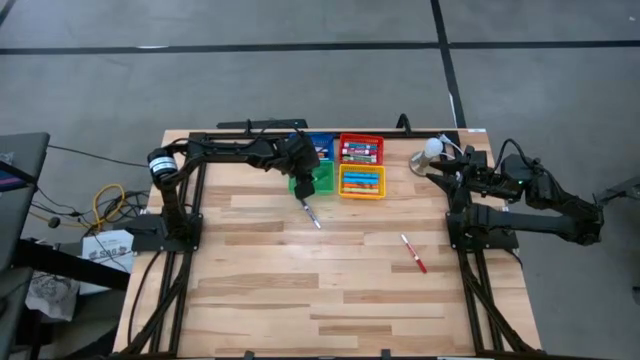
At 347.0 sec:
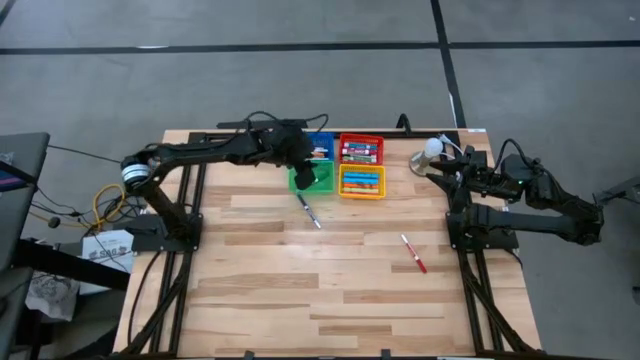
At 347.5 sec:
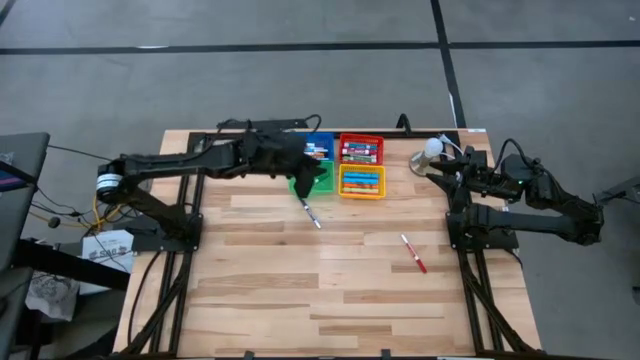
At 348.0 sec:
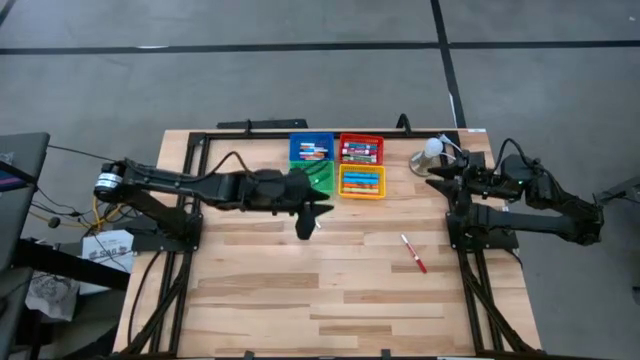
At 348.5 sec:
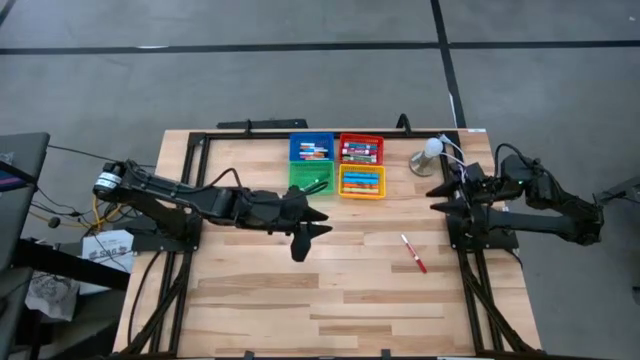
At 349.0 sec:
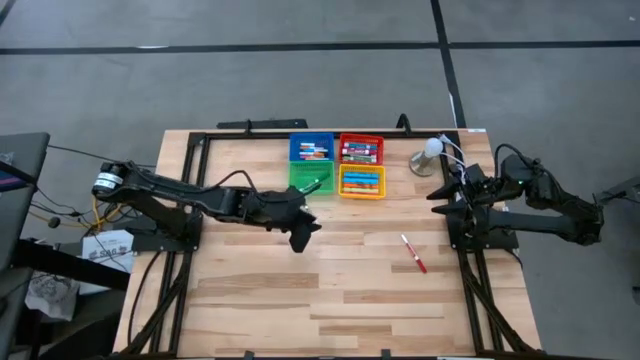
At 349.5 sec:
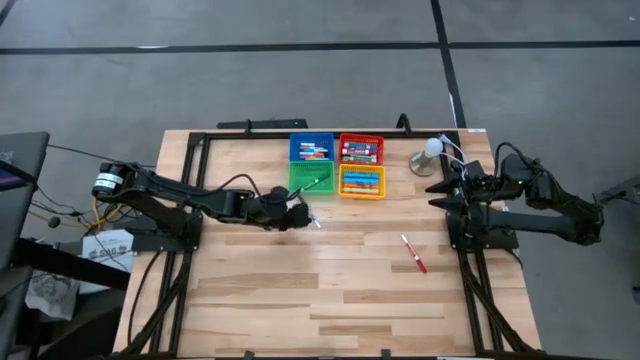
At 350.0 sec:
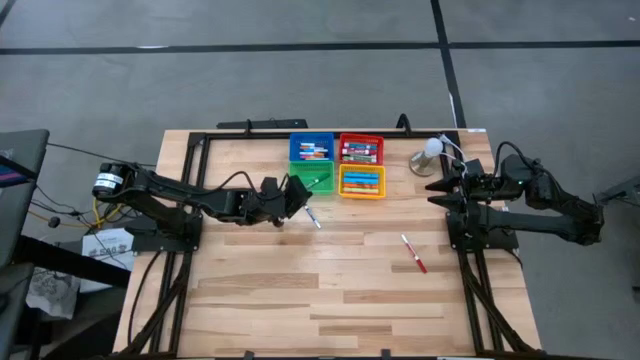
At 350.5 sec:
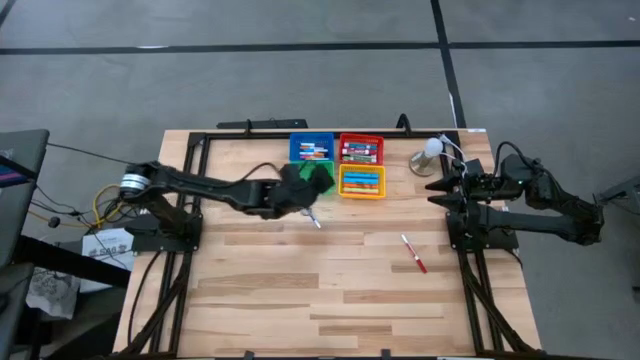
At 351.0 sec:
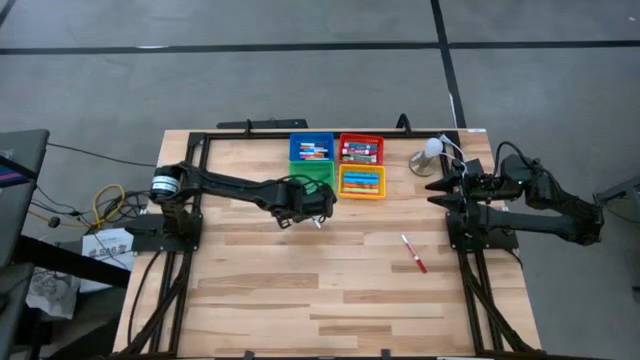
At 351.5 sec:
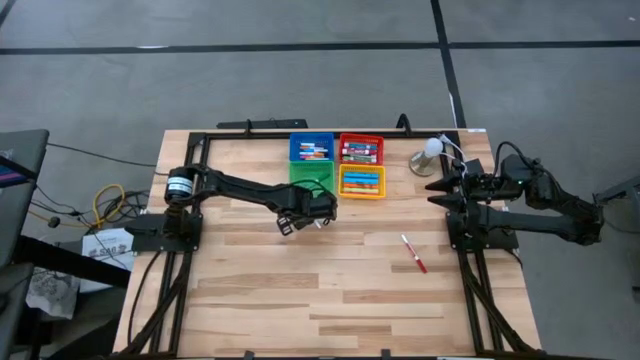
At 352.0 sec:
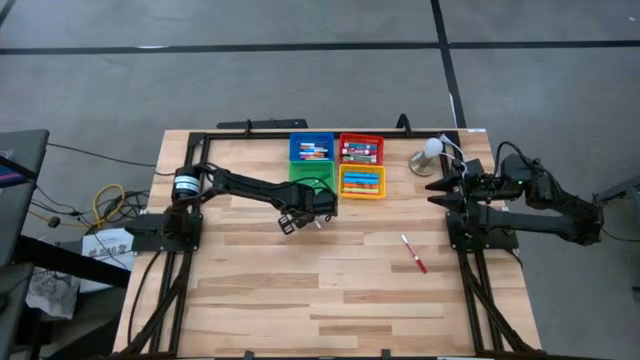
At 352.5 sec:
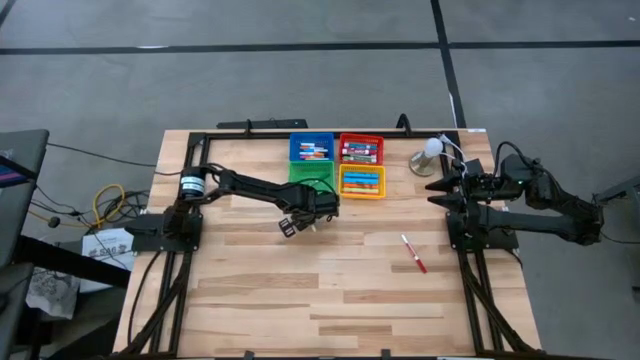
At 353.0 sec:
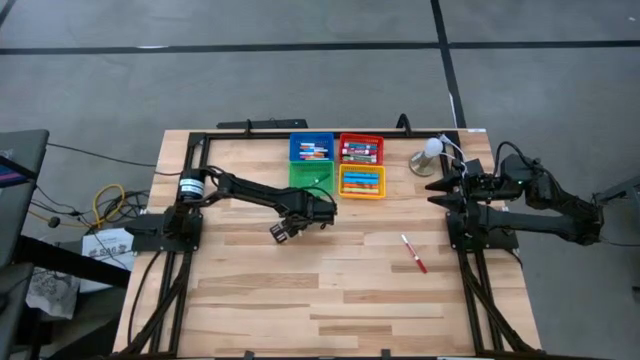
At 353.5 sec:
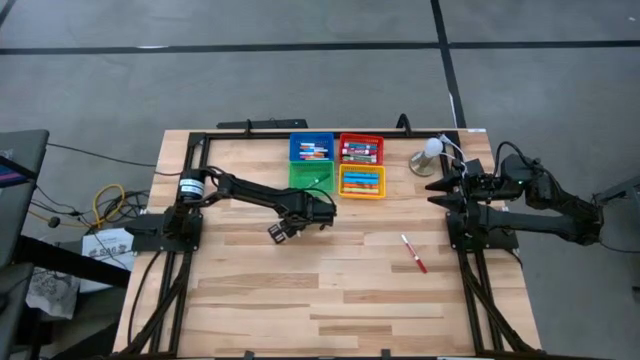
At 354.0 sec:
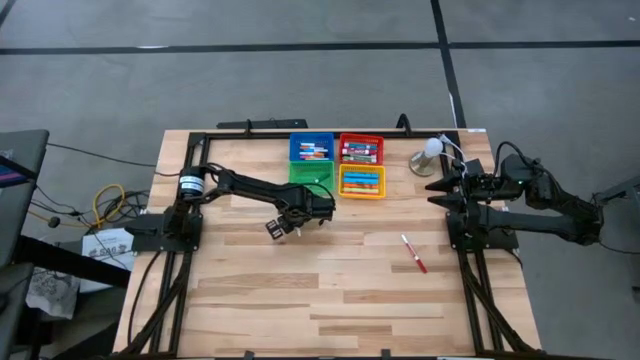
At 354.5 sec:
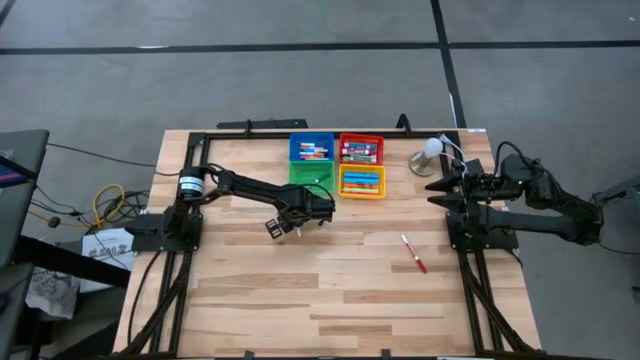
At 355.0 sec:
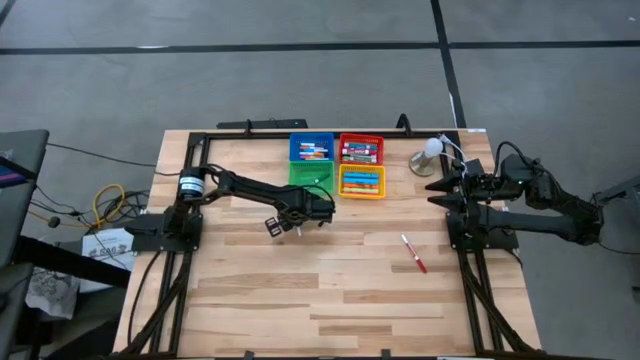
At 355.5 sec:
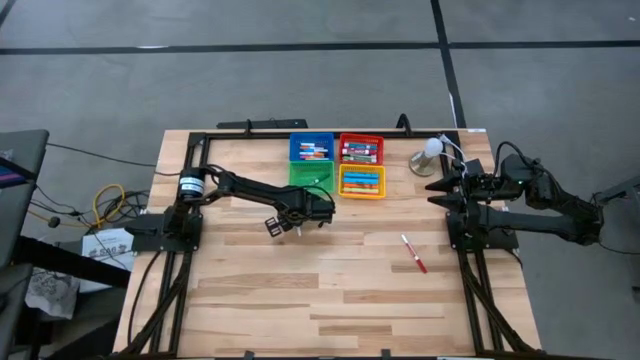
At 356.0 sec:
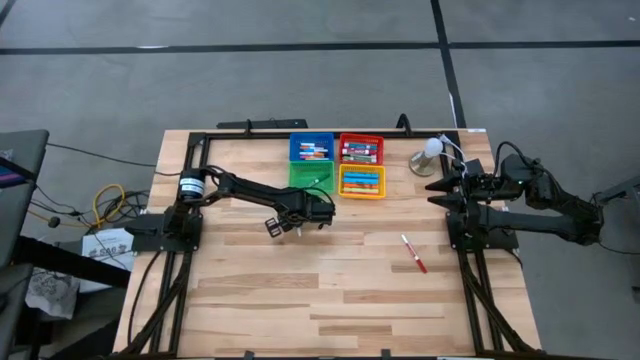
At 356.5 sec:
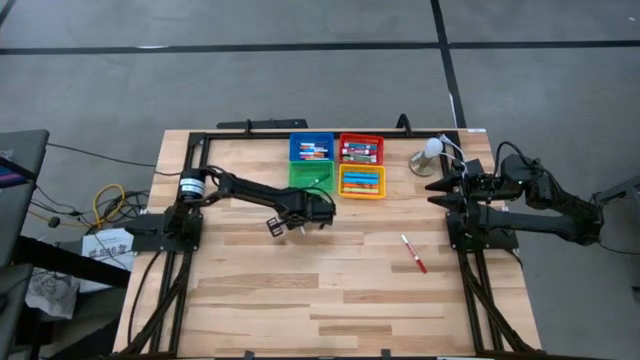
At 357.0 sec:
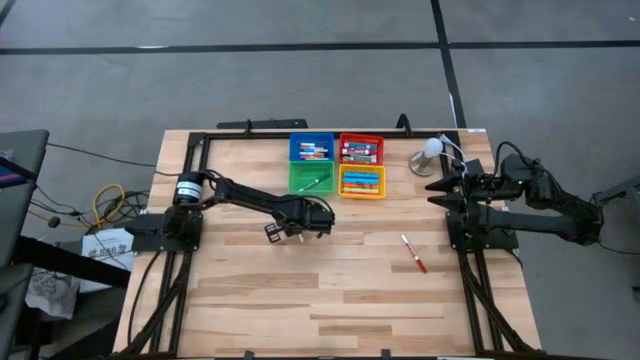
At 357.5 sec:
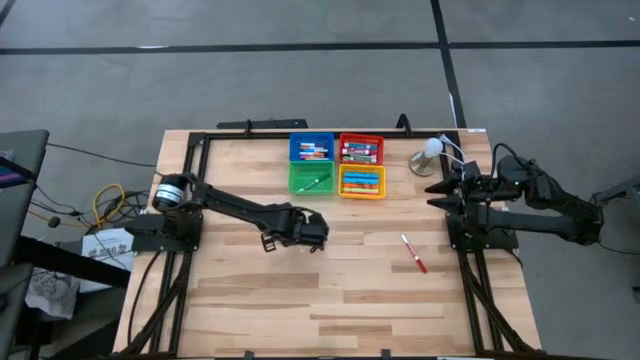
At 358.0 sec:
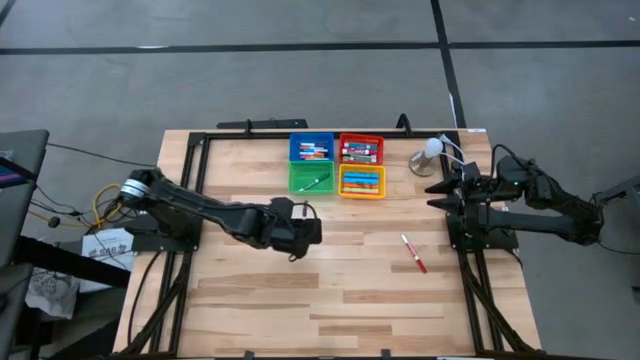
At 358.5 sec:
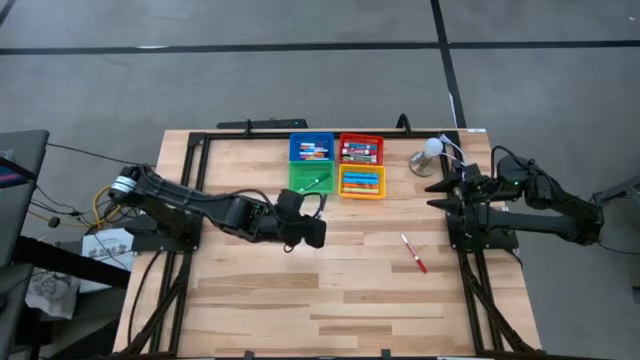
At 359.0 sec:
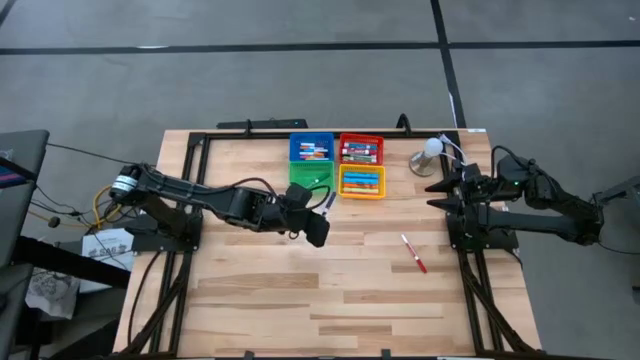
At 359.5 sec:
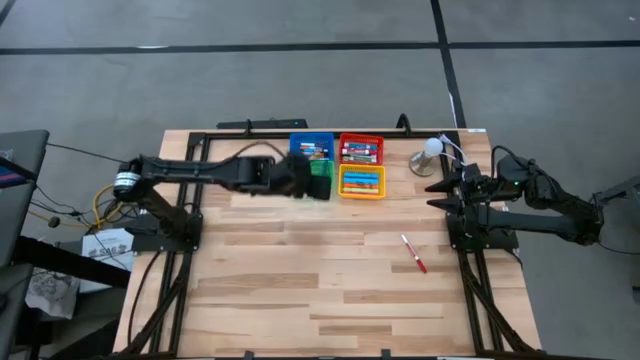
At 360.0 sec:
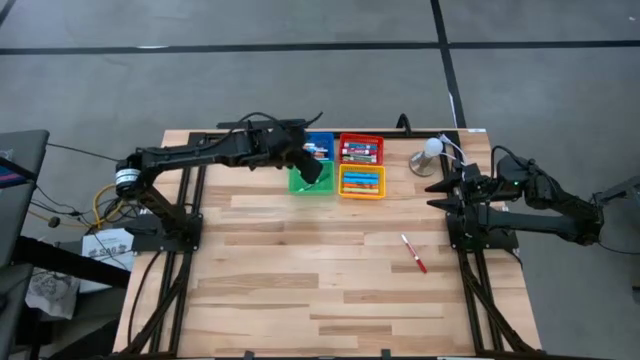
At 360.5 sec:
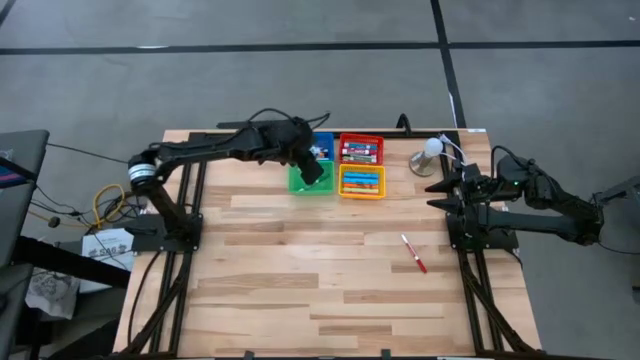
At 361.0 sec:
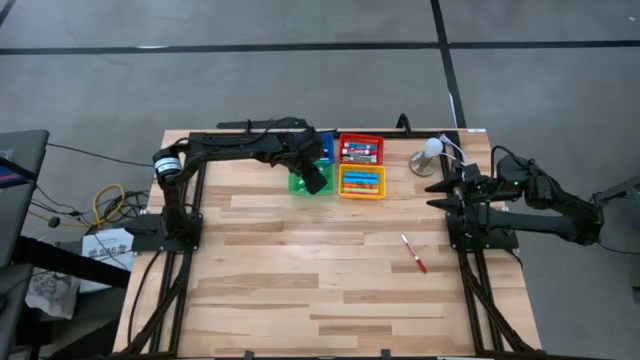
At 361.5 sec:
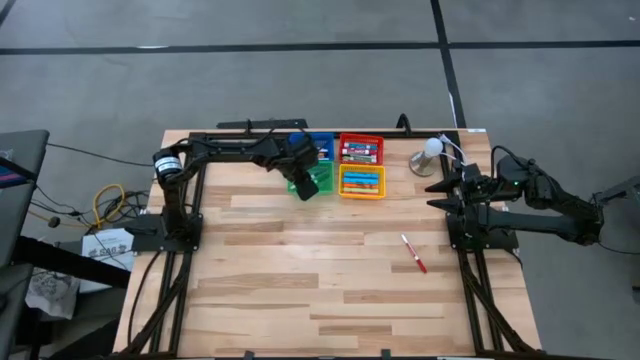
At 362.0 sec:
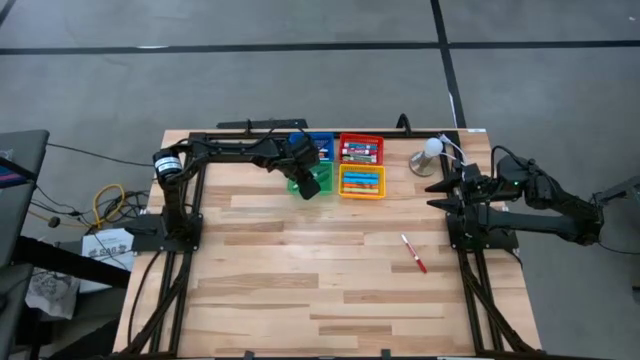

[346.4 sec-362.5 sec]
Task: Pick & Place Markers
Put the small dark blue marker pen into the green bin
